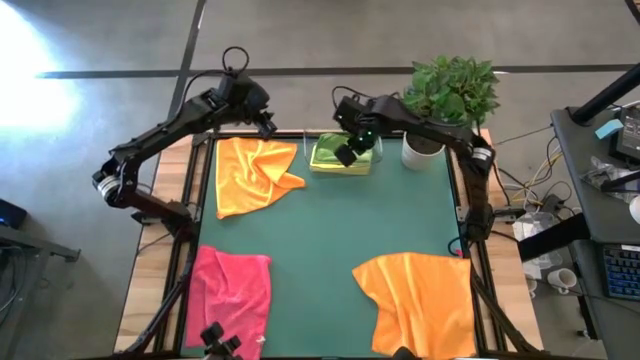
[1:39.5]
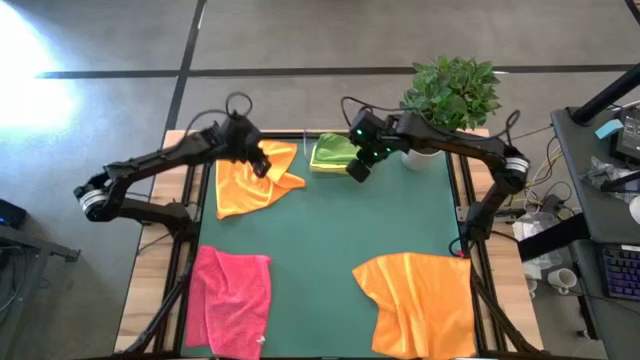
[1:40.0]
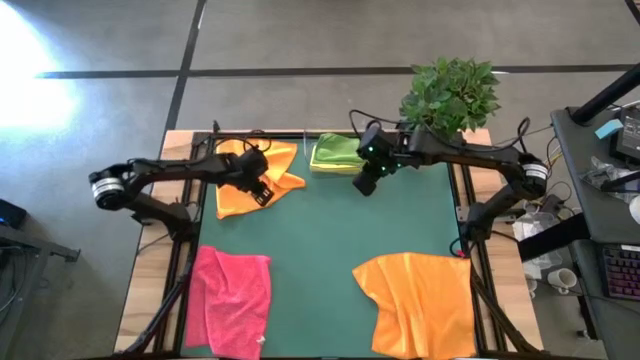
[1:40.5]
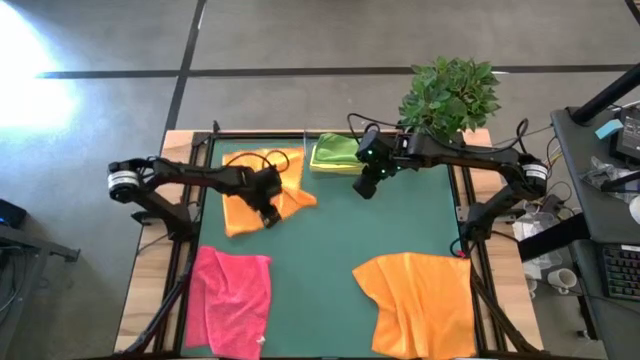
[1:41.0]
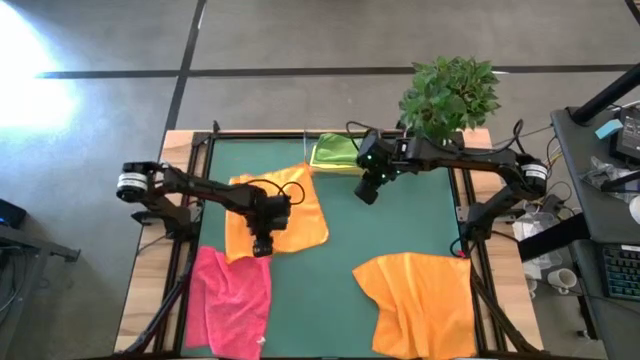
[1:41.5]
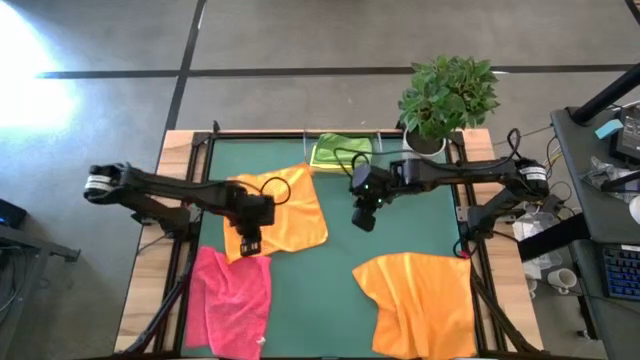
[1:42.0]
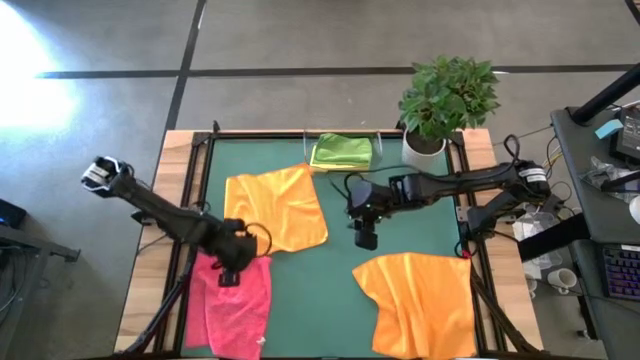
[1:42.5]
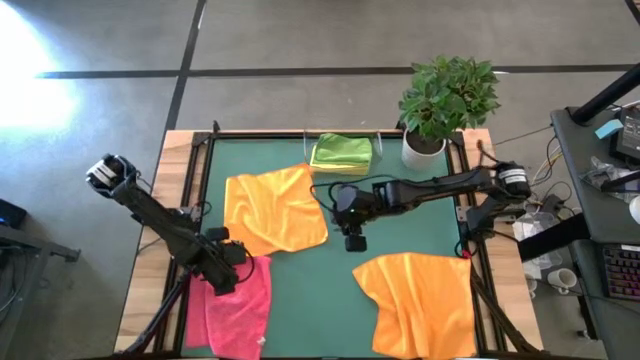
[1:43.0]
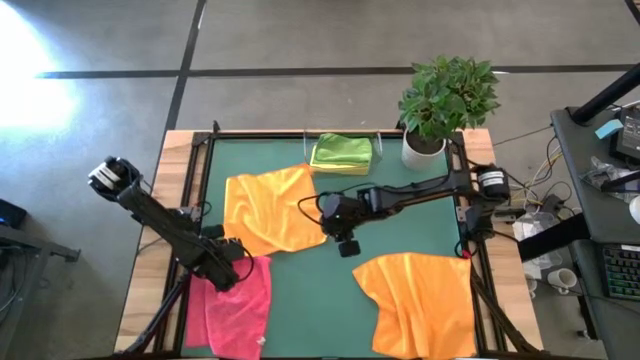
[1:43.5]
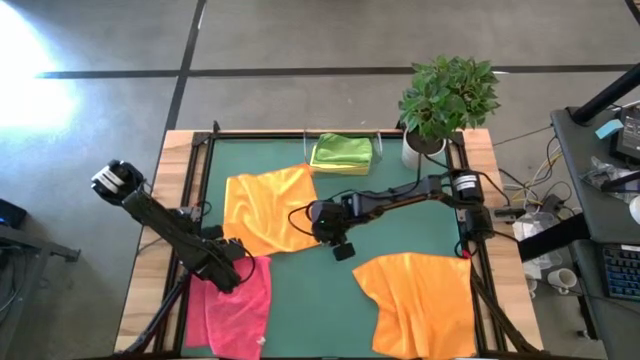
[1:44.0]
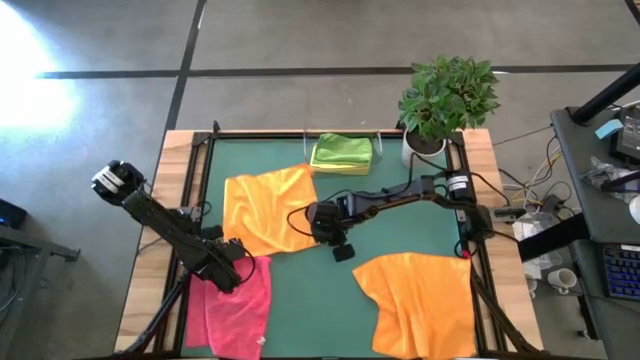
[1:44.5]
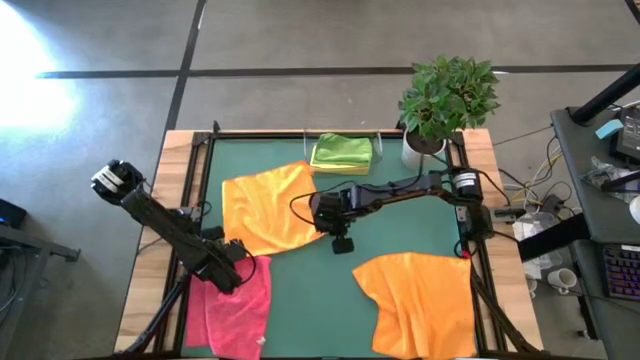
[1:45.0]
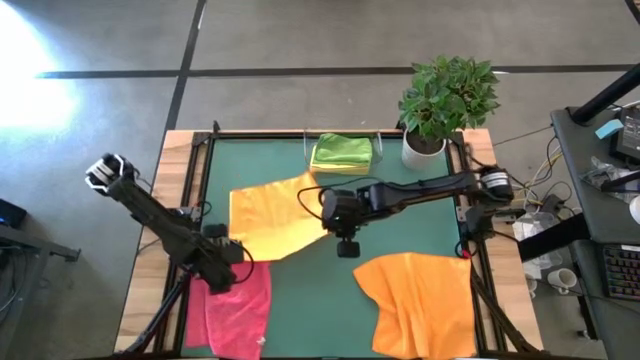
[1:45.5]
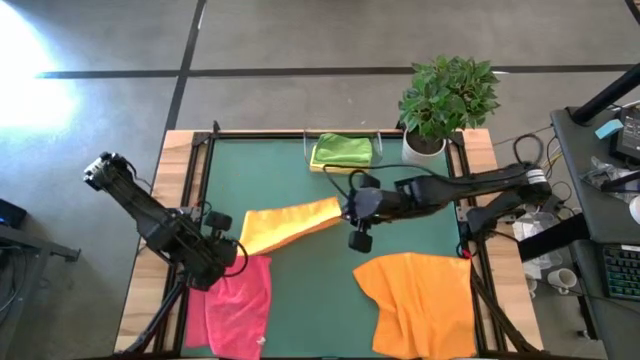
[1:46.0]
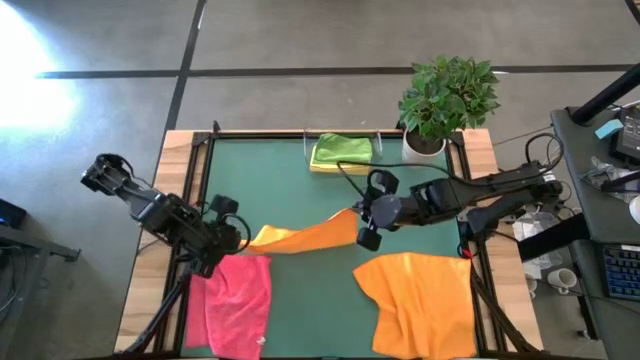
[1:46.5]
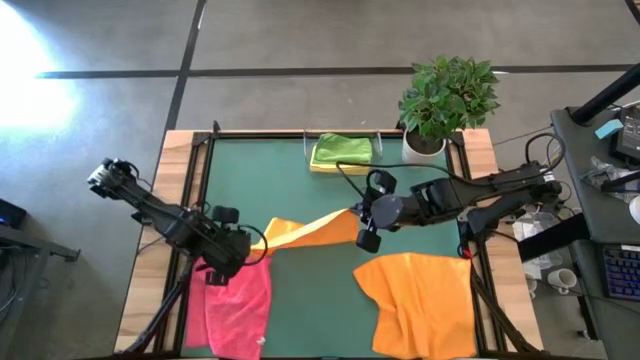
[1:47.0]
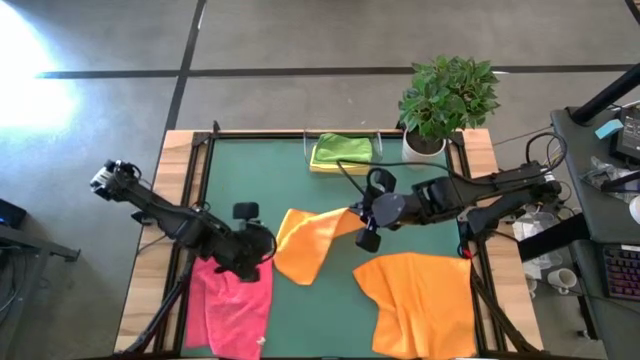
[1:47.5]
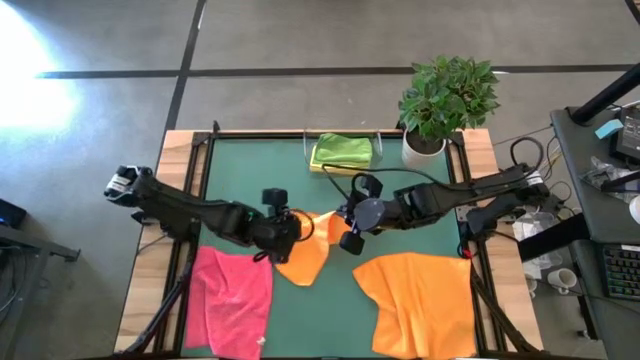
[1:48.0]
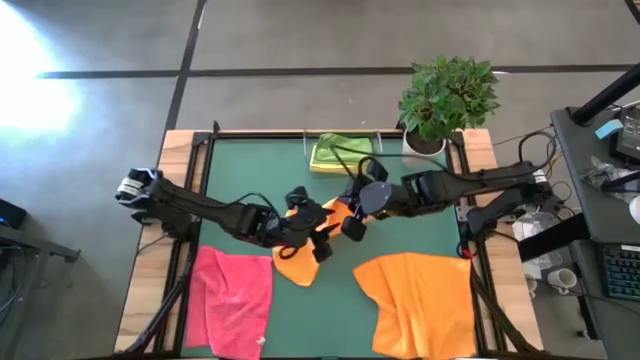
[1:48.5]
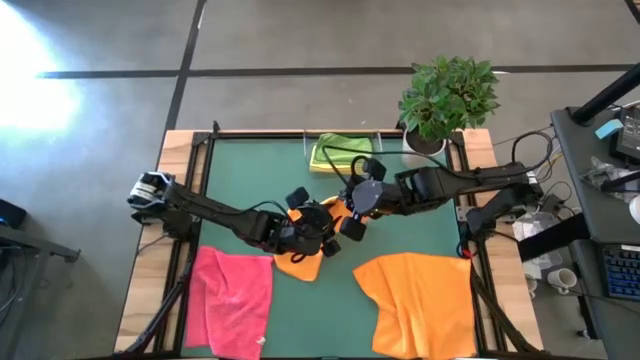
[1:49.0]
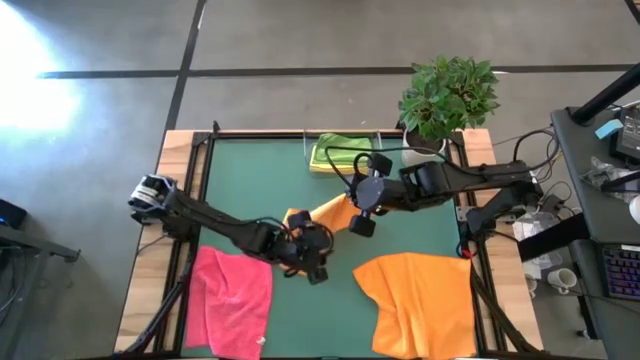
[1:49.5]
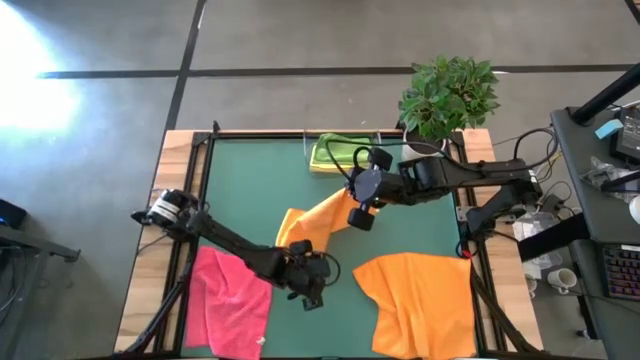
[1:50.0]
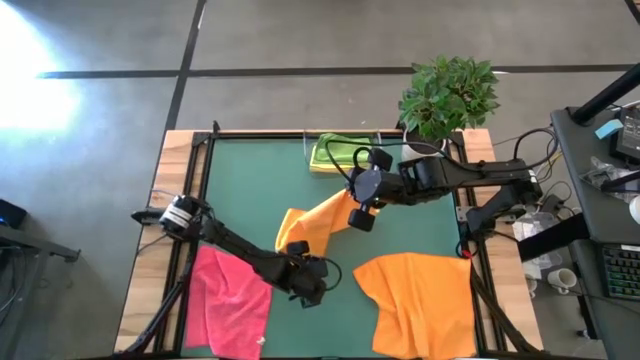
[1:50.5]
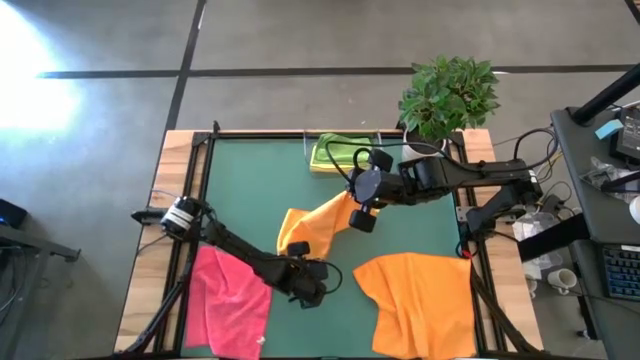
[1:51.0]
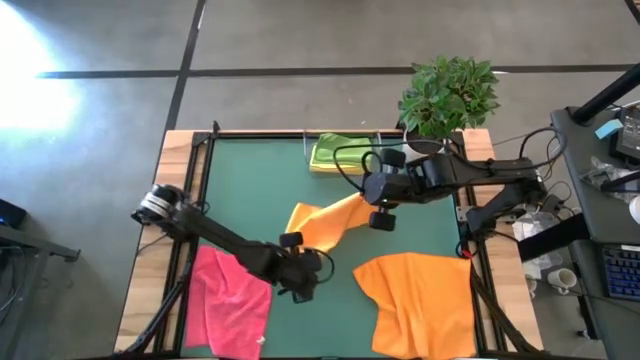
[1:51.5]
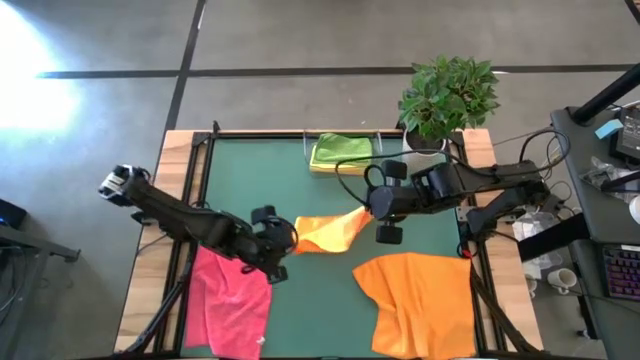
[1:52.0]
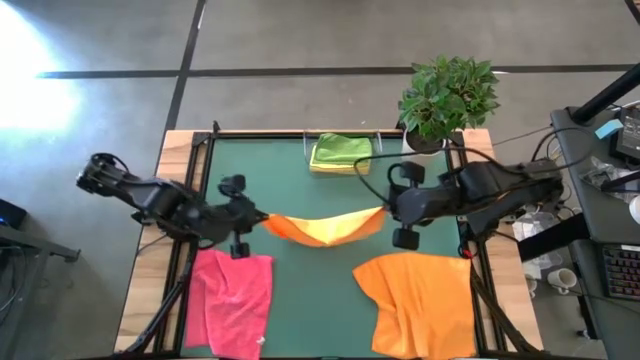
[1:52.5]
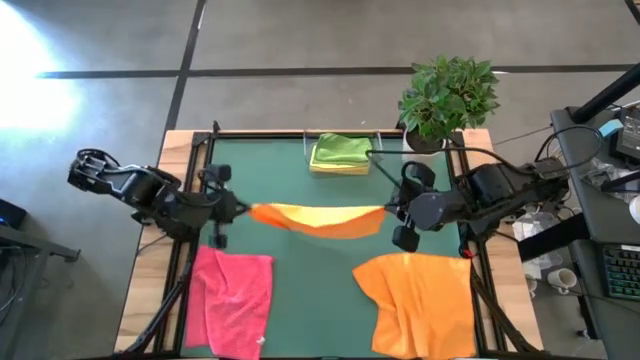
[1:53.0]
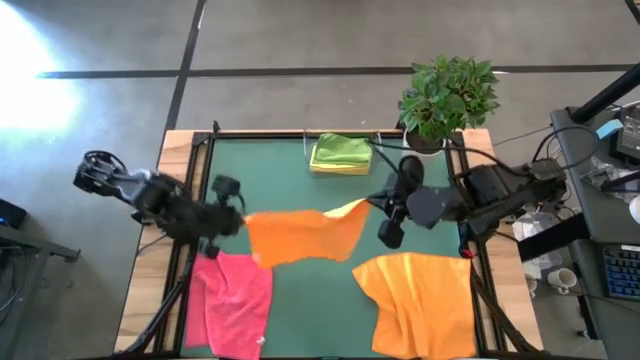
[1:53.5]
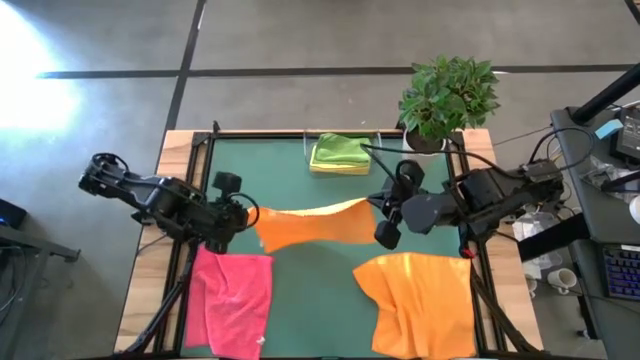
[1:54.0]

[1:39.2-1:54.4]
Task: Fold microfiber towels
Fold the orange towel

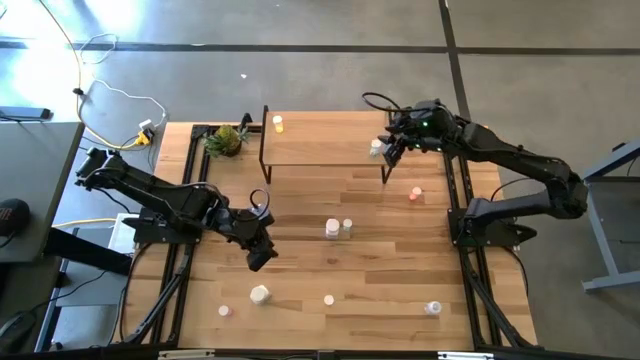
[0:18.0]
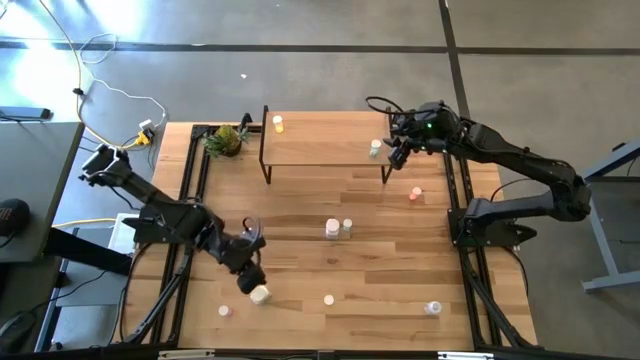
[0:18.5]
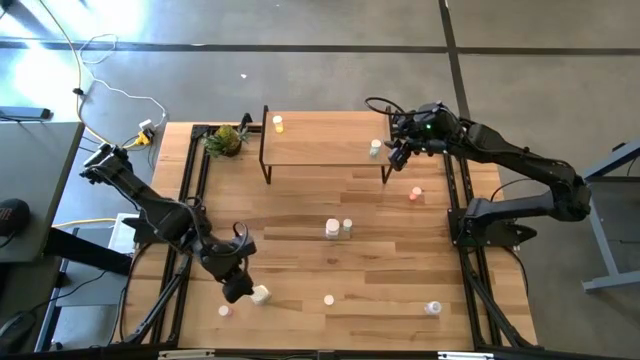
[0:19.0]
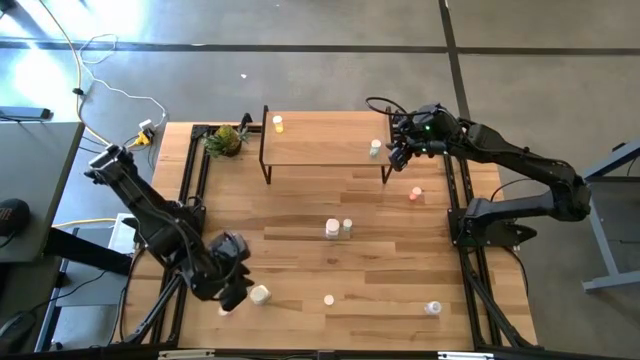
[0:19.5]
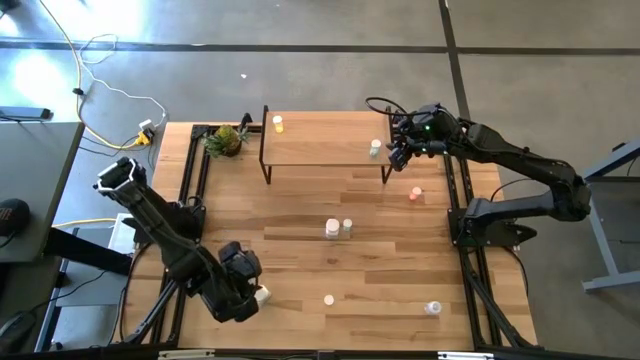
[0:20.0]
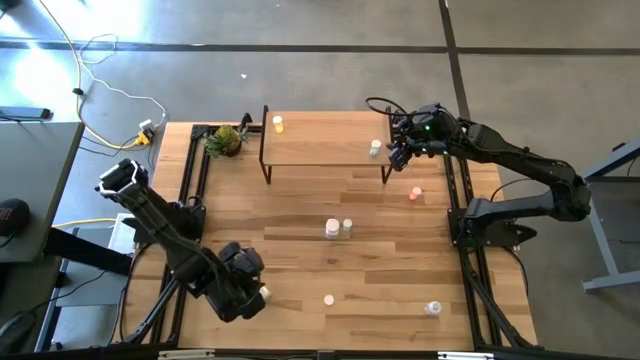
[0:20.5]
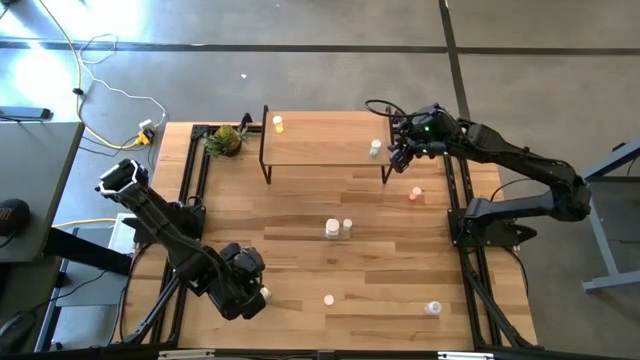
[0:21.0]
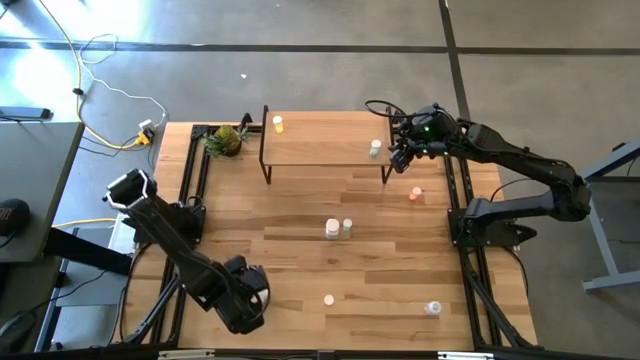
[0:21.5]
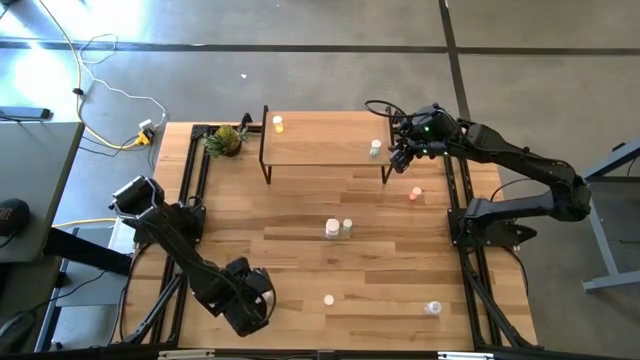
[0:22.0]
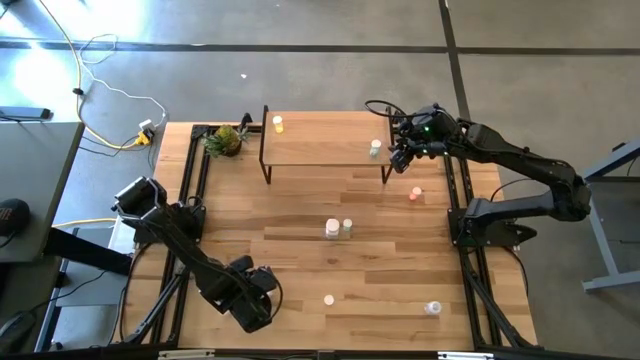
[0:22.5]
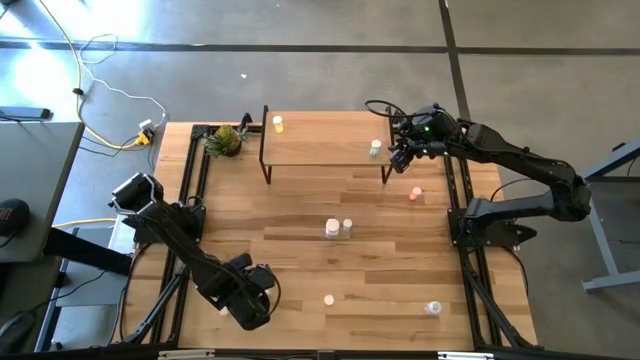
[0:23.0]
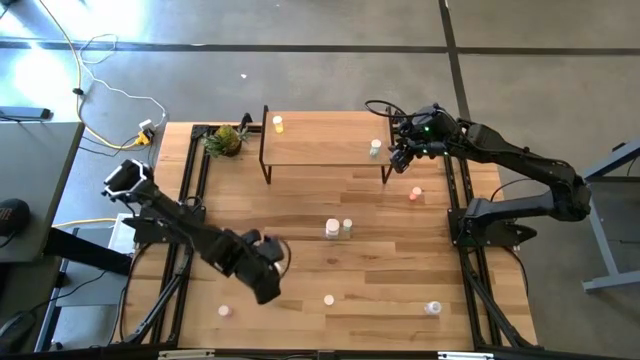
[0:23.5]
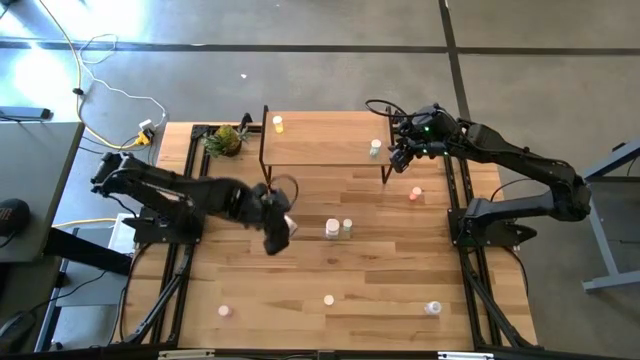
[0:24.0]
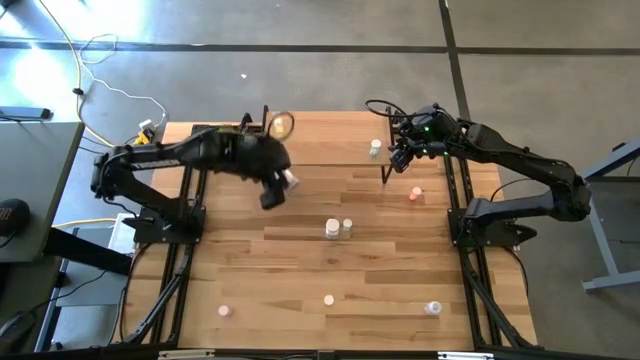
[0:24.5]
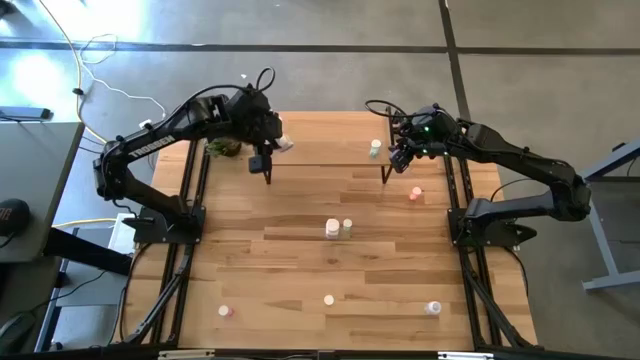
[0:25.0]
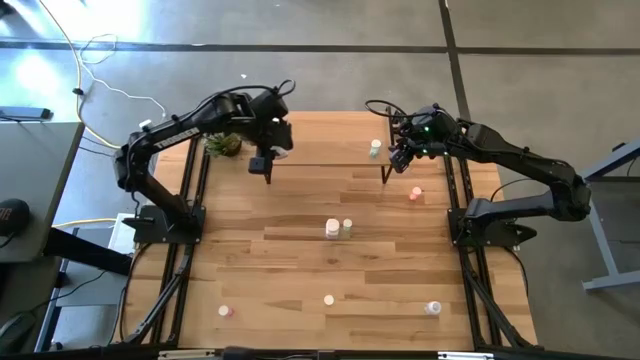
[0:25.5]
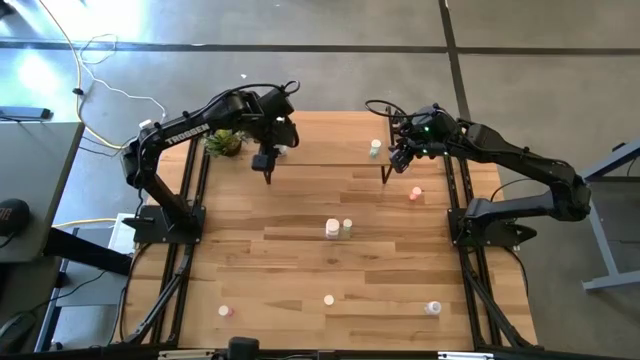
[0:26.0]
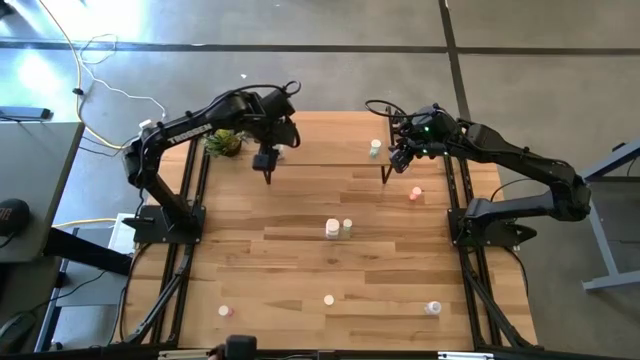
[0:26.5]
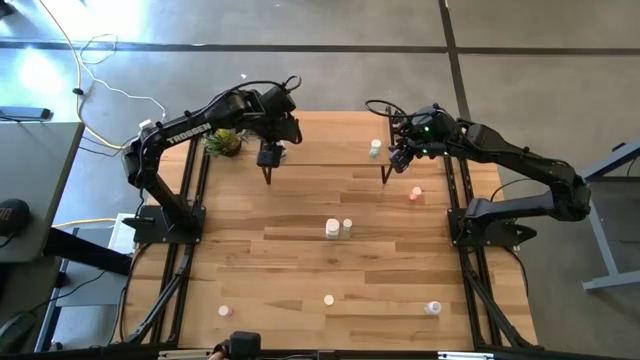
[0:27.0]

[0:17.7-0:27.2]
Task: Pick and place medicine bottles onto shelf by color
Put the white and blue medicine bottle on the shelf
